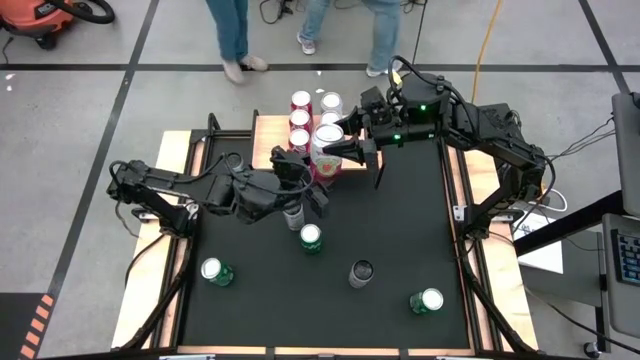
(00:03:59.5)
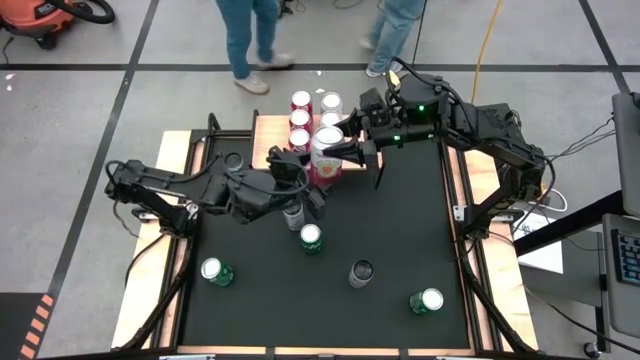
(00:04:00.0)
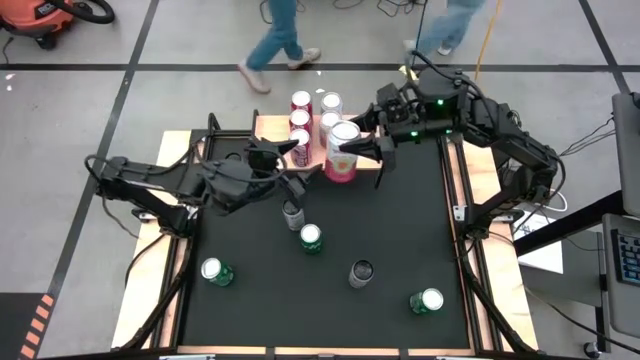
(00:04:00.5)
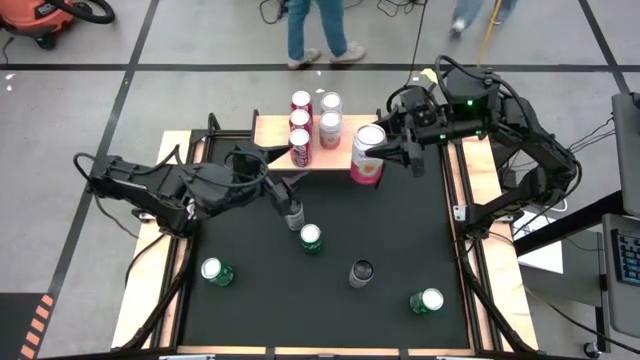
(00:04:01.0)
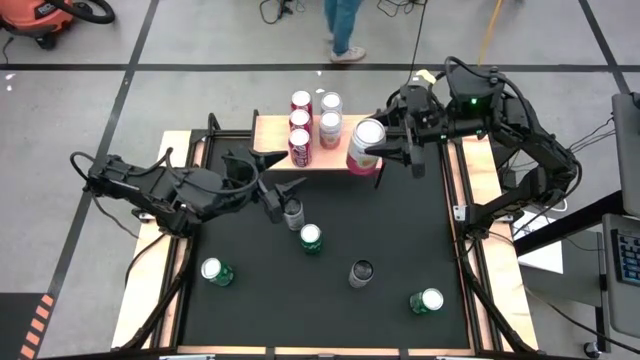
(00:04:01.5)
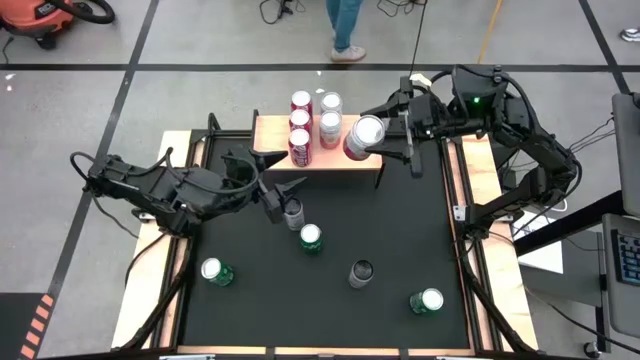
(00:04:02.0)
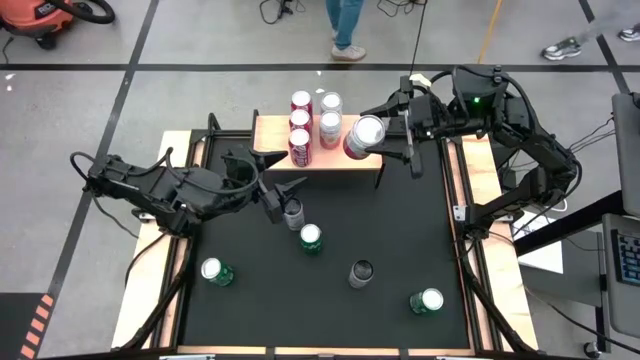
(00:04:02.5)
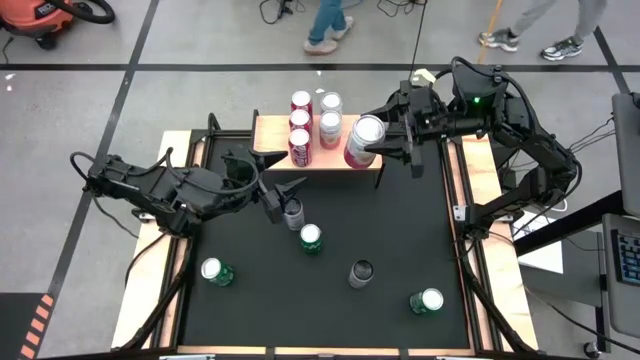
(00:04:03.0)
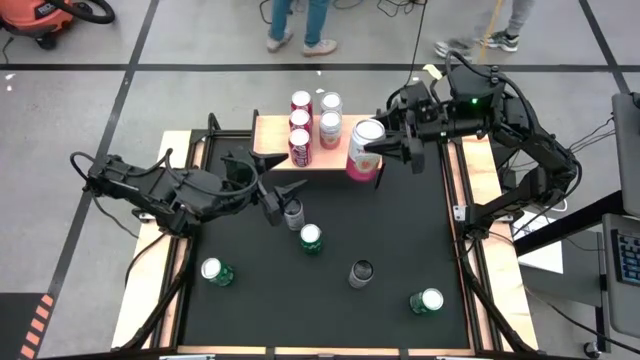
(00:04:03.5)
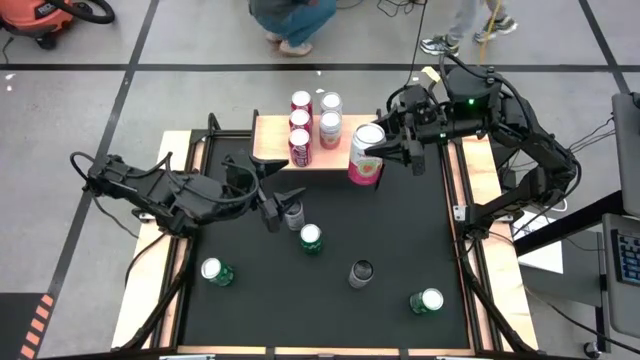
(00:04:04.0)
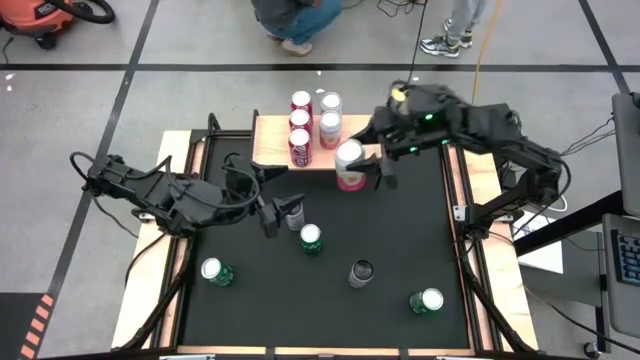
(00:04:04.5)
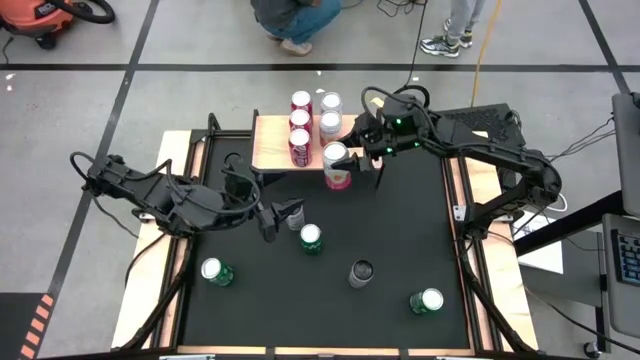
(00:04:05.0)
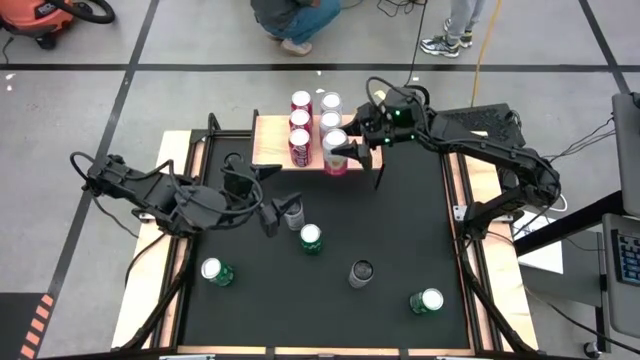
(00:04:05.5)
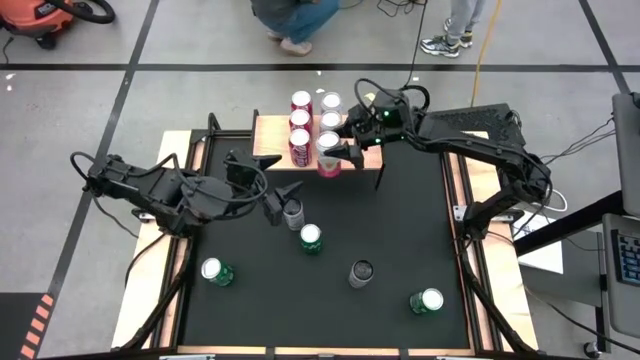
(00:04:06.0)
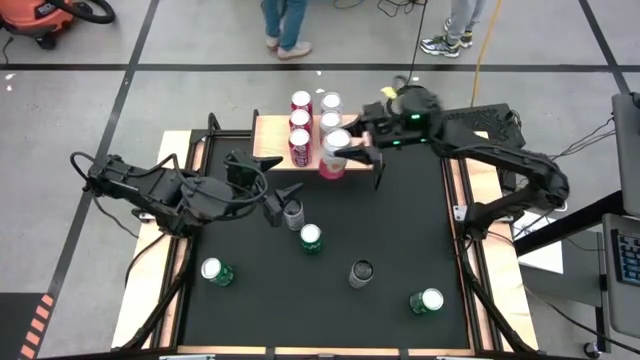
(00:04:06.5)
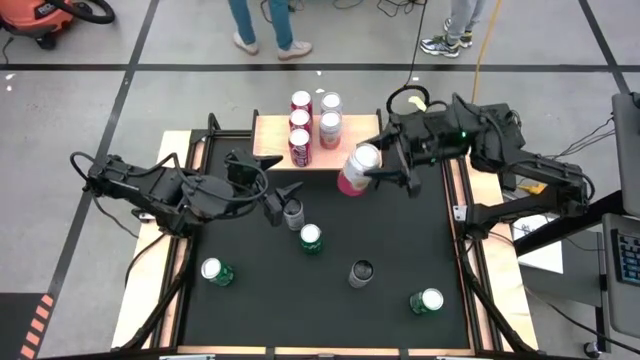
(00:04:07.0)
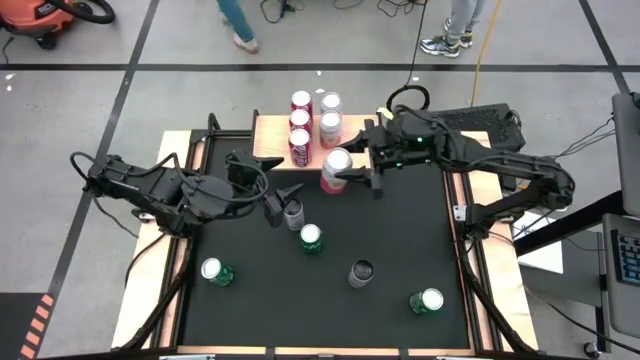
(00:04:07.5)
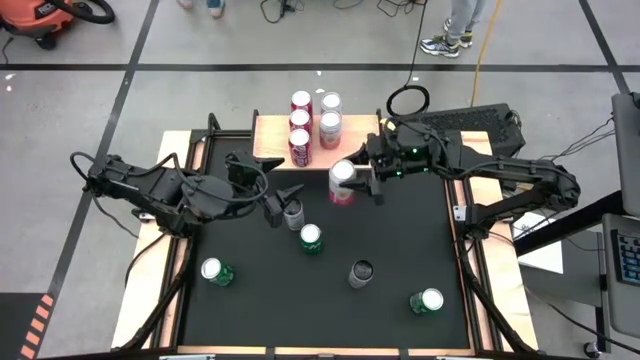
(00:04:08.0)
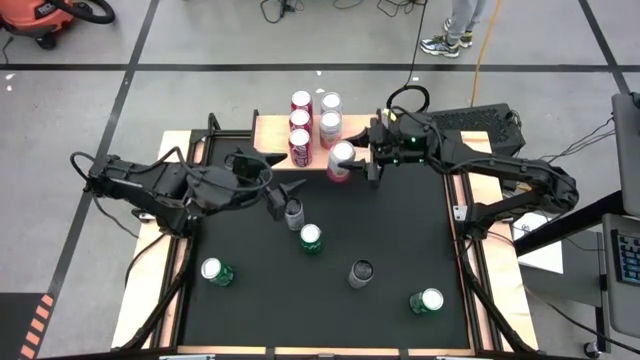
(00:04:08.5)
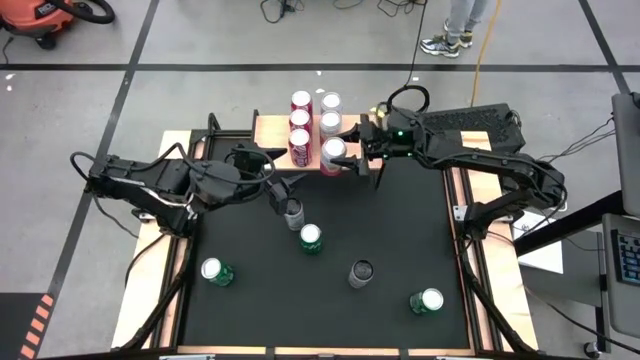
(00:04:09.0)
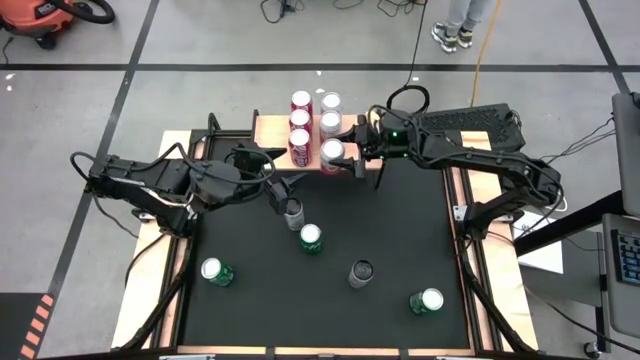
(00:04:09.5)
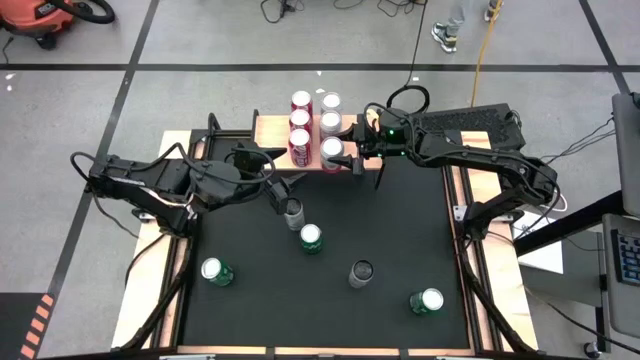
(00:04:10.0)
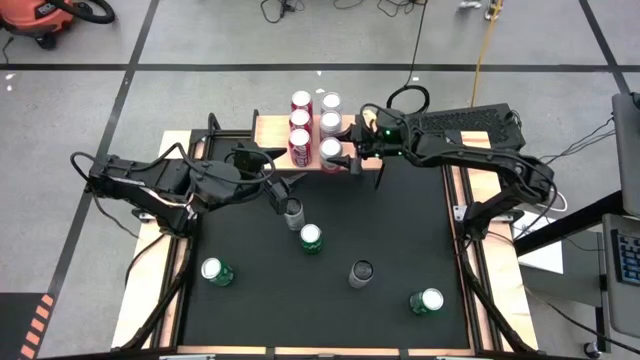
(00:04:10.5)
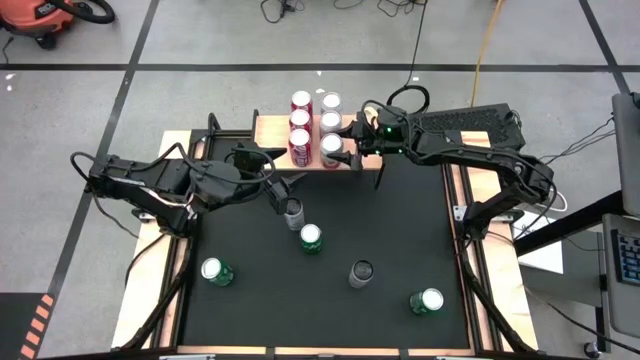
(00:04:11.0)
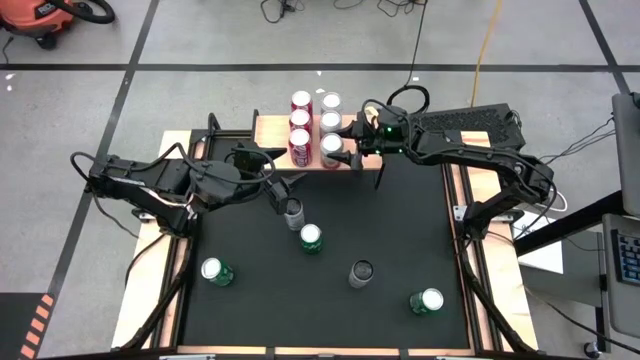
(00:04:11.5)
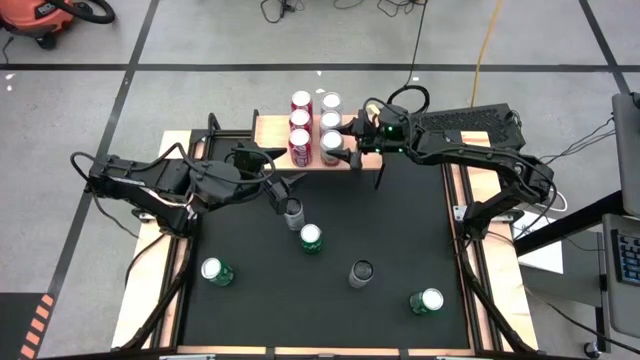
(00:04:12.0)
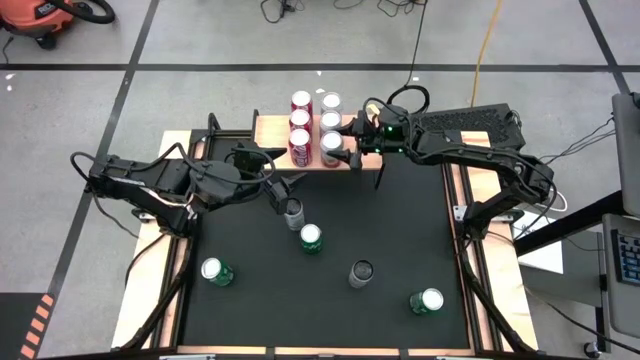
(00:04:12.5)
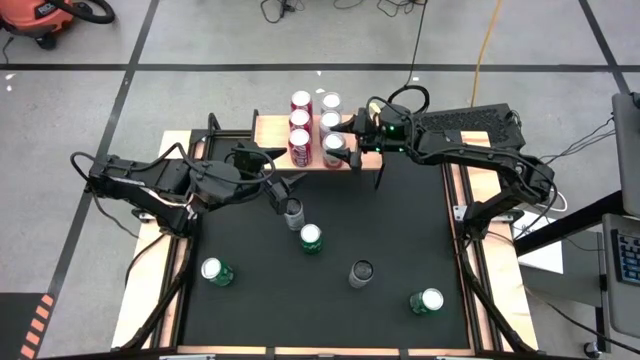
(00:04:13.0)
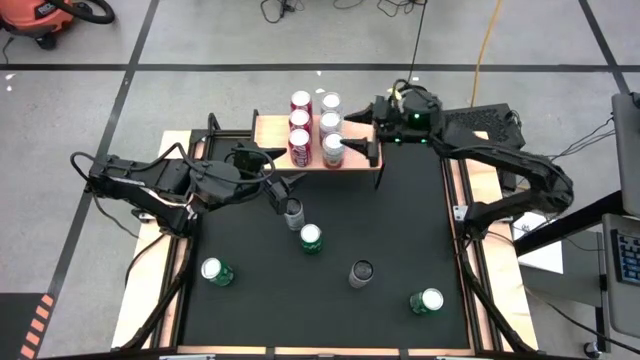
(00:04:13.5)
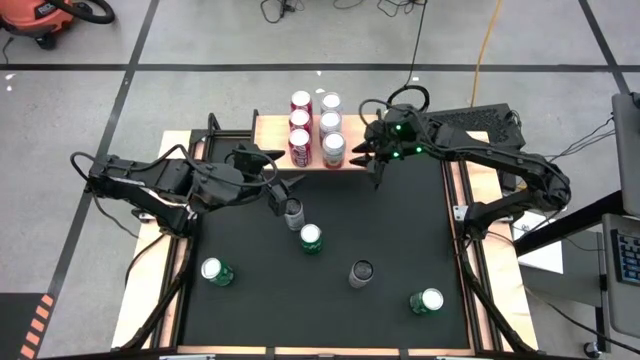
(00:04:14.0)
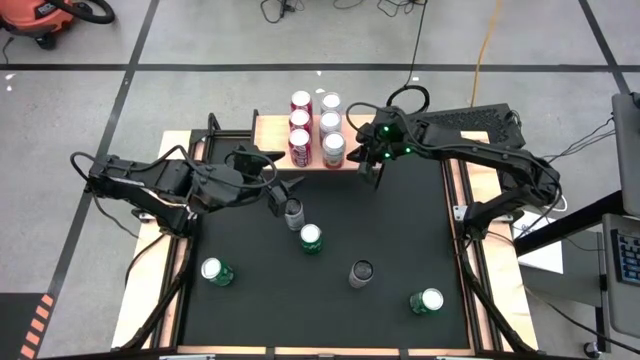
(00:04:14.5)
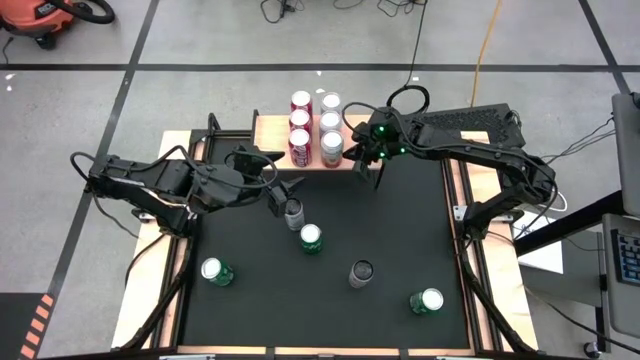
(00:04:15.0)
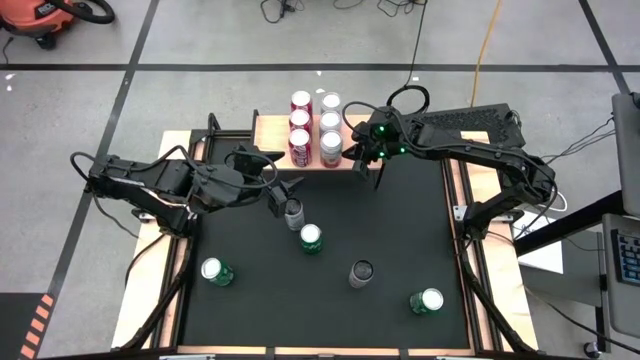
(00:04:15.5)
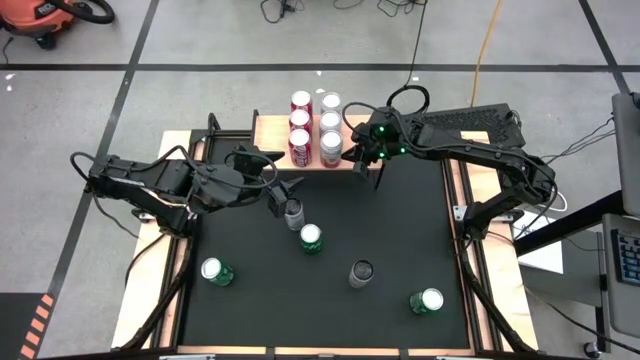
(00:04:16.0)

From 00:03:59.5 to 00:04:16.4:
Task: Place canned beverage on shelf
Put the white pink soda can on the shelf aligned with the other white pink soda cans

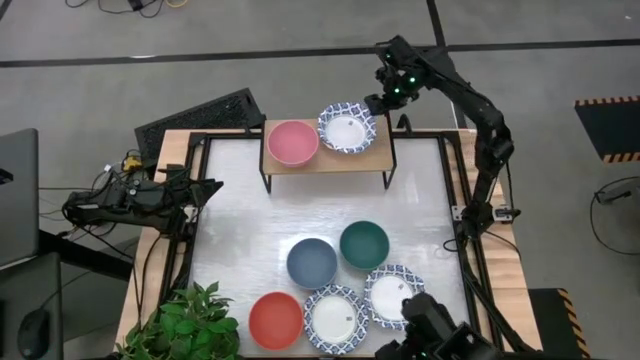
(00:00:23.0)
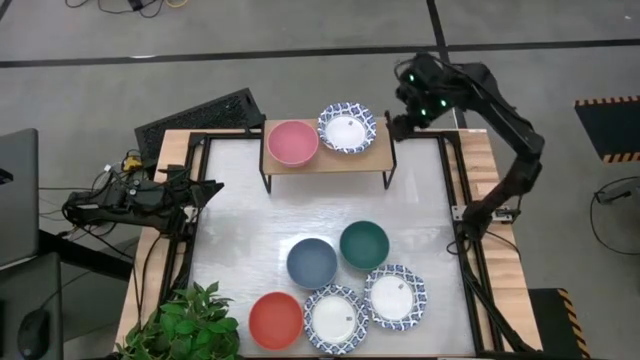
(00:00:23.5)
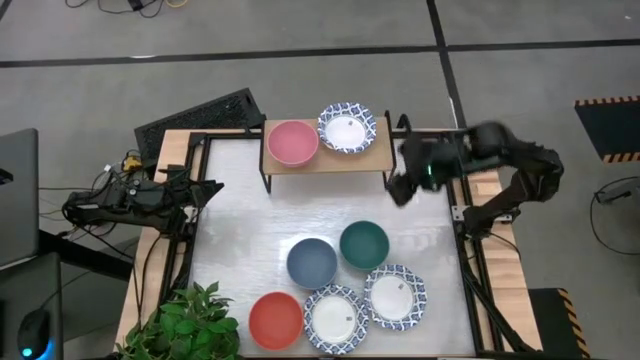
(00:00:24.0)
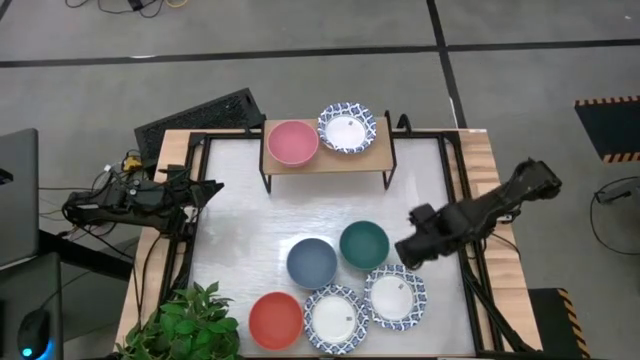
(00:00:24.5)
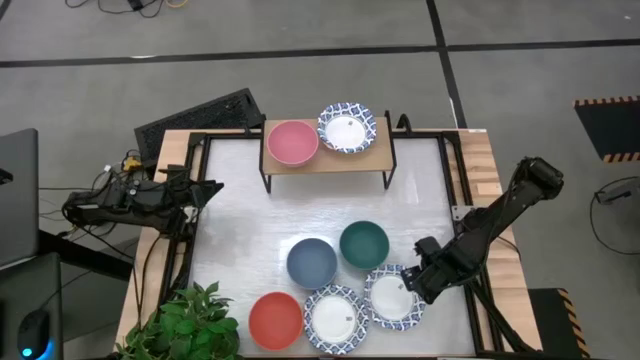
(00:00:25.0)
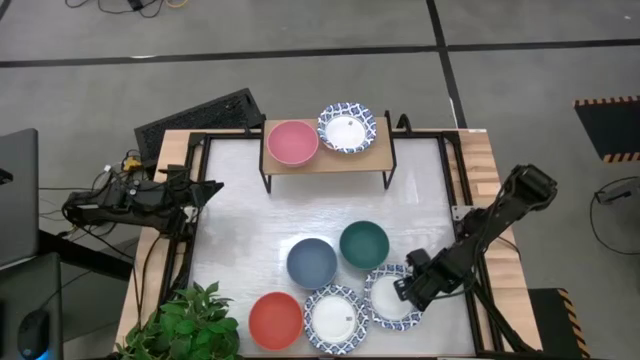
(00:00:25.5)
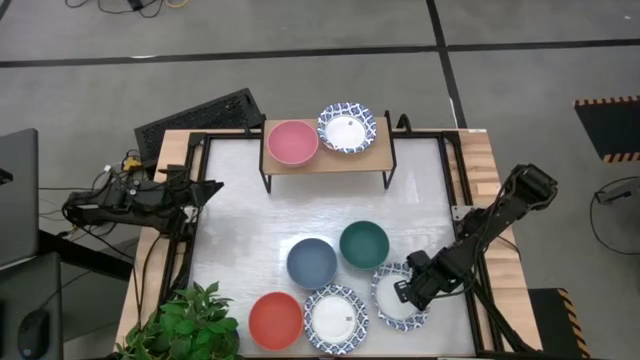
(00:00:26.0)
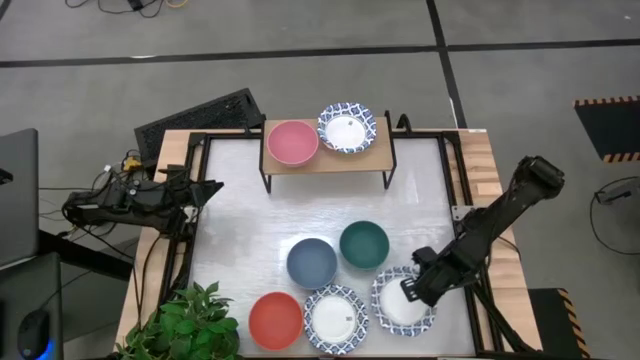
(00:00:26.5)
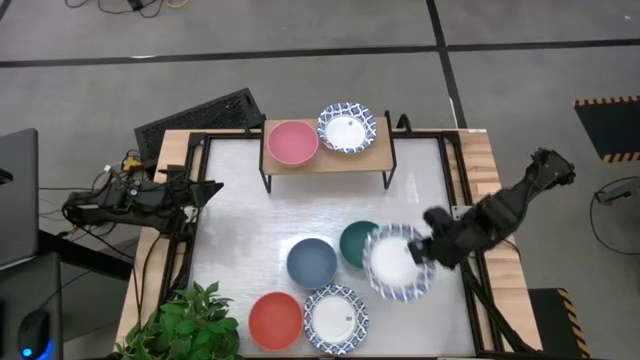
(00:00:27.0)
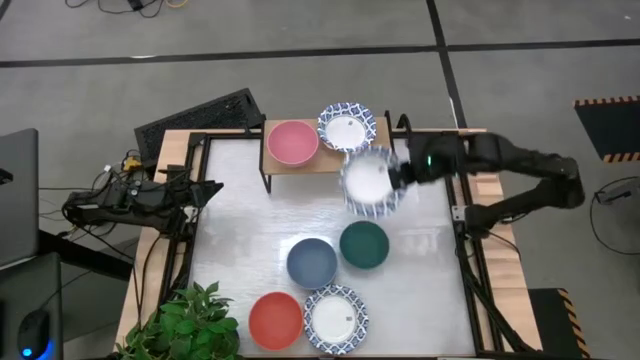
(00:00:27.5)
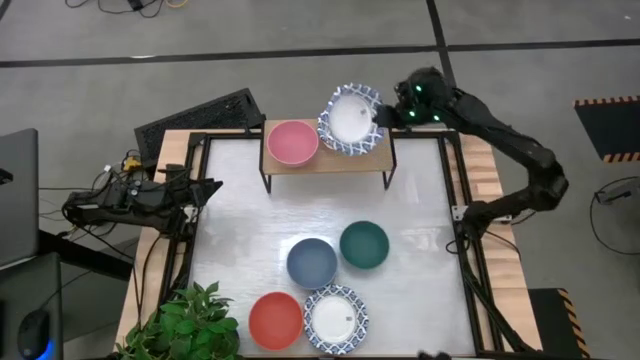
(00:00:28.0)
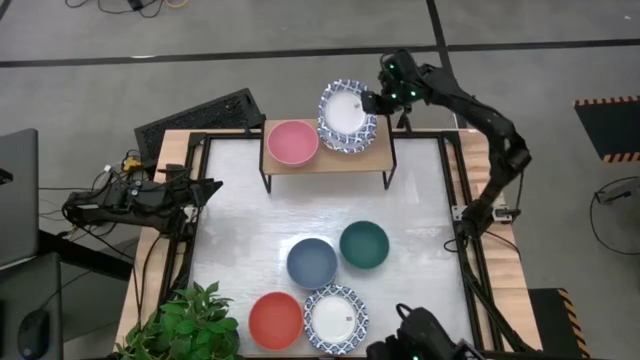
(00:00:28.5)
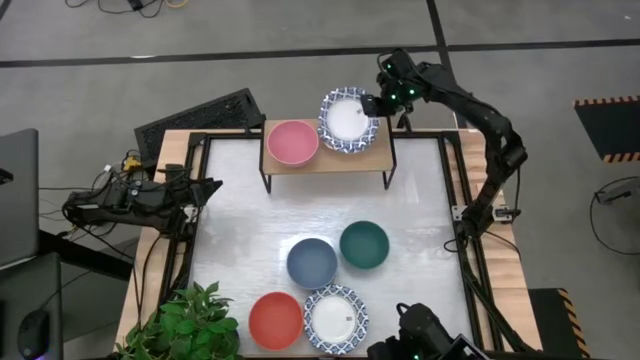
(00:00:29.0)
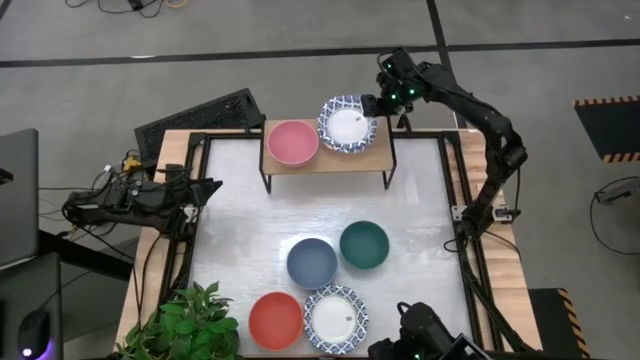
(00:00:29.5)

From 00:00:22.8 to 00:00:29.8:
Task: Place and stack bowls onto a shelf
Stack the white patterned bowl on top of the white patterned bowl on the shelf
